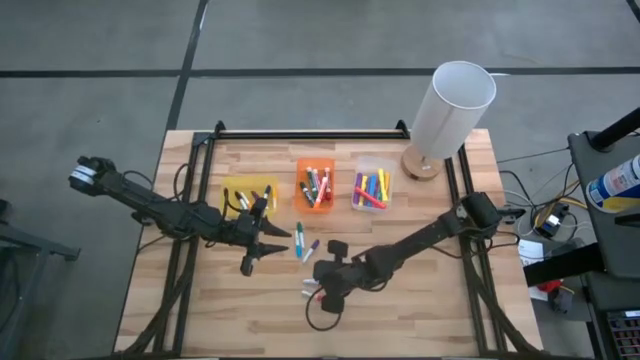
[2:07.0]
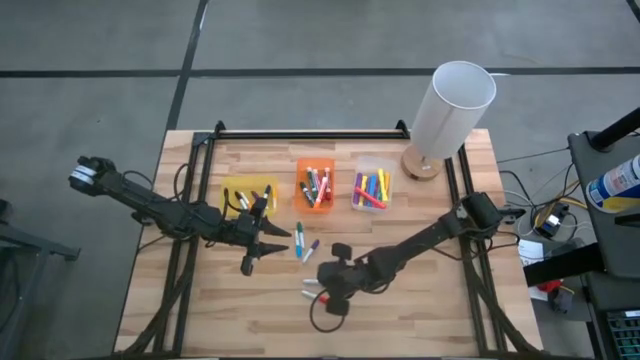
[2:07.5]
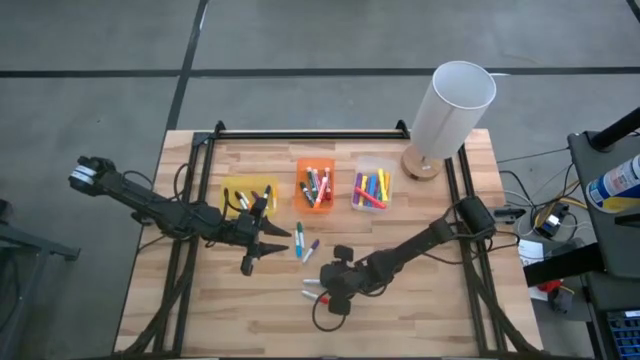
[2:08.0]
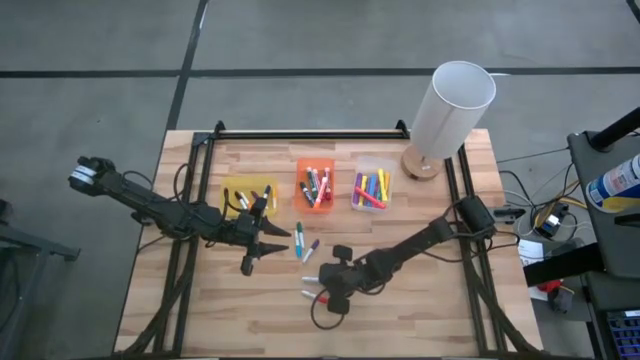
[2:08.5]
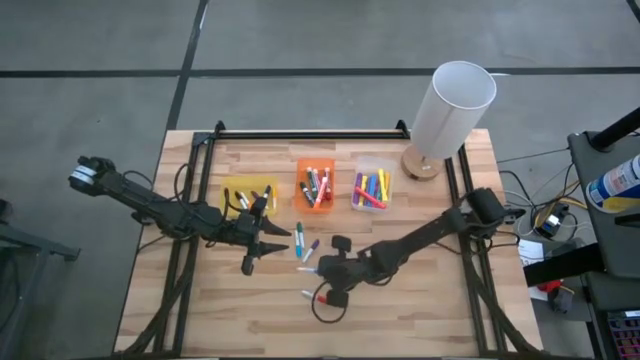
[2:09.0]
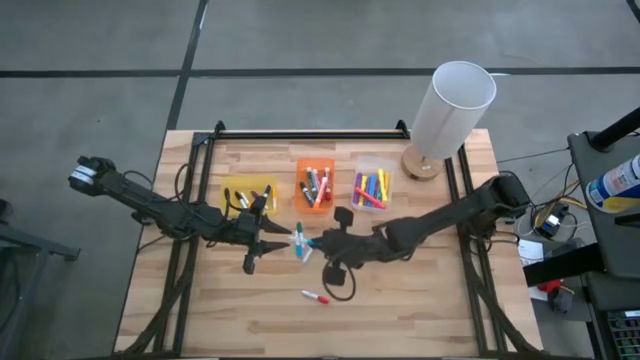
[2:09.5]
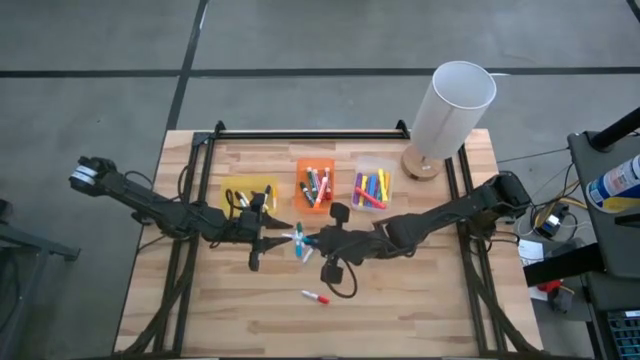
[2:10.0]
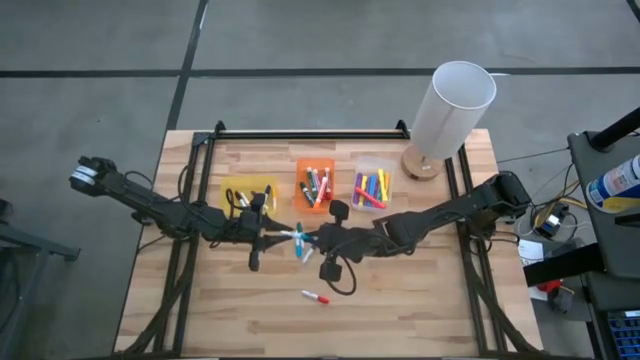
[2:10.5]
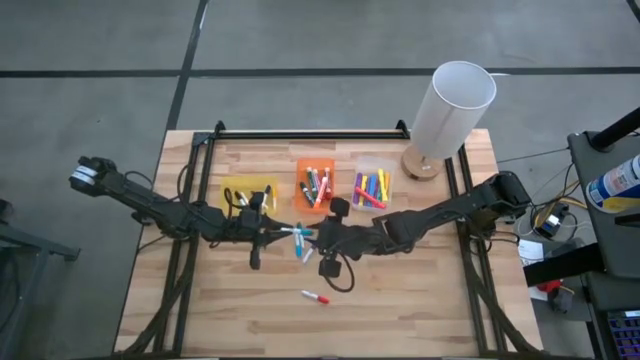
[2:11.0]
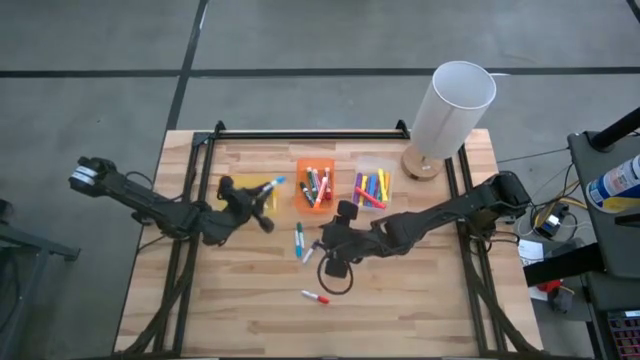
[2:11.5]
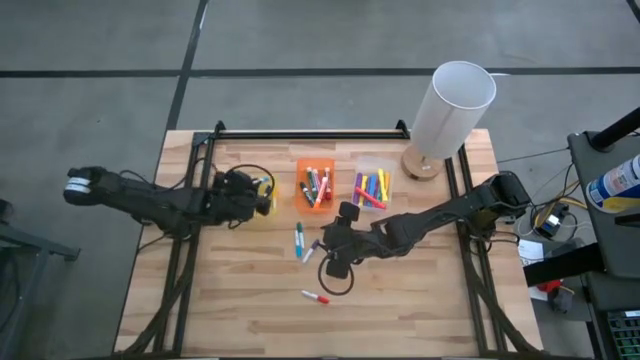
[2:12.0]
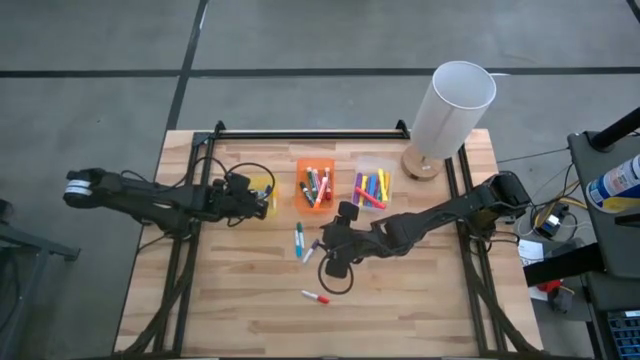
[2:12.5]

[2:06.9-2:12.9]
Task: Pick & Place Markers
Put the small light blue marker into the yellow bin

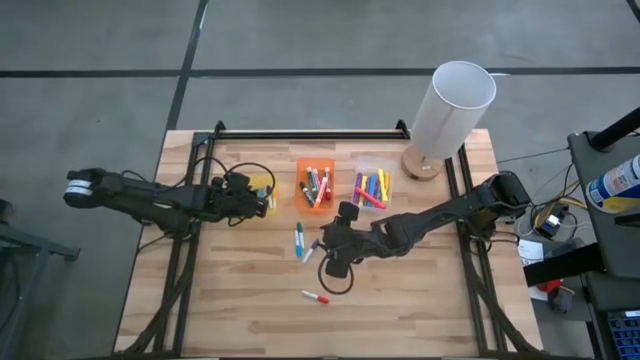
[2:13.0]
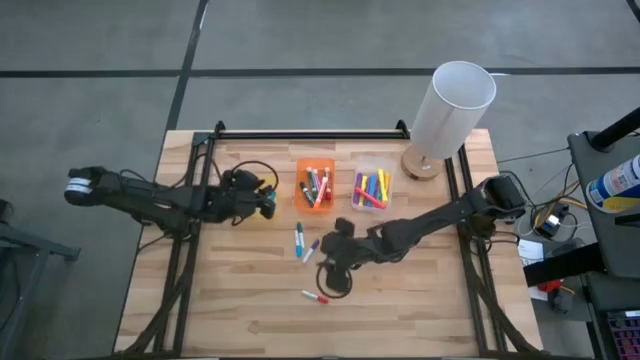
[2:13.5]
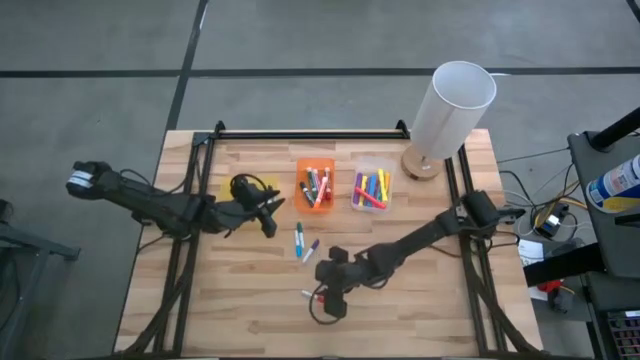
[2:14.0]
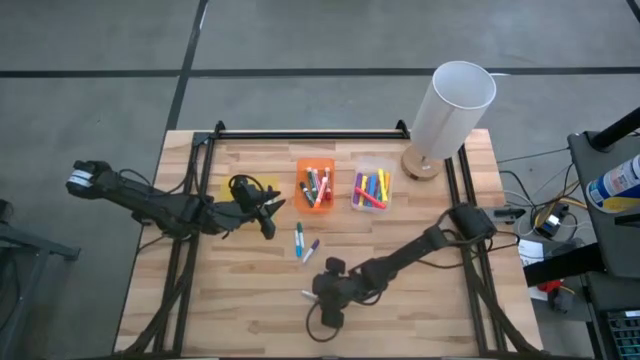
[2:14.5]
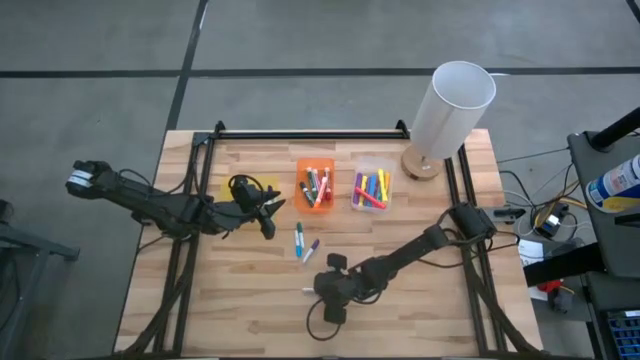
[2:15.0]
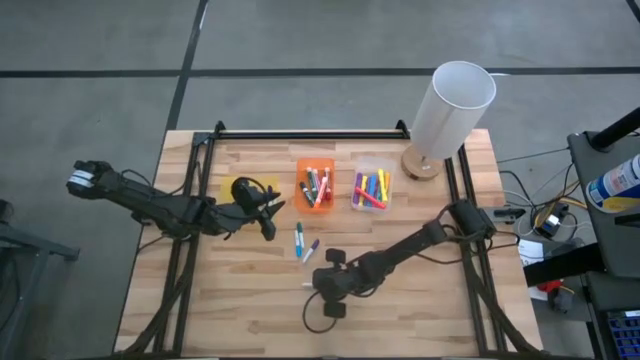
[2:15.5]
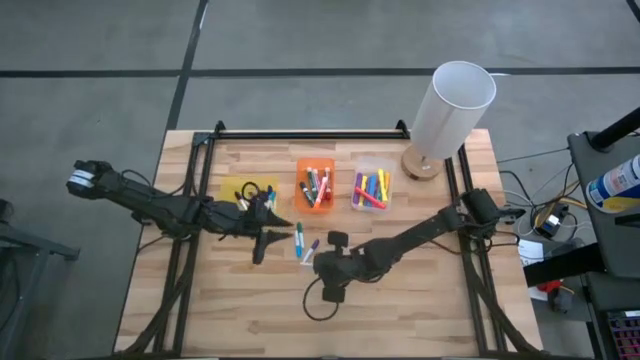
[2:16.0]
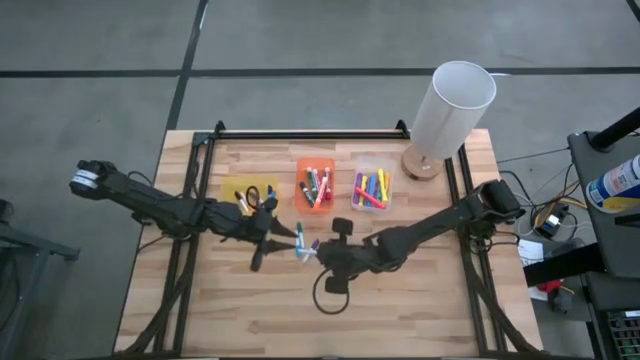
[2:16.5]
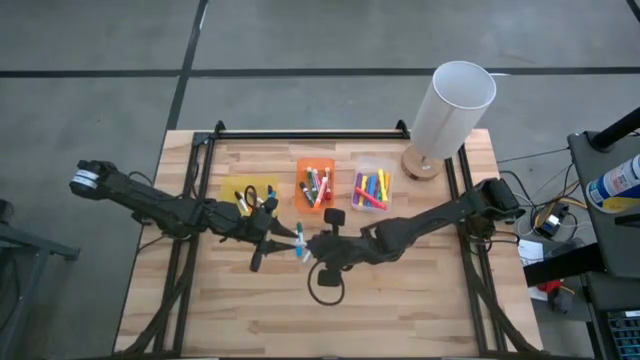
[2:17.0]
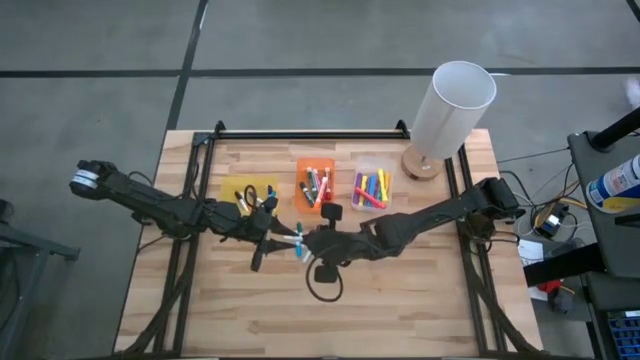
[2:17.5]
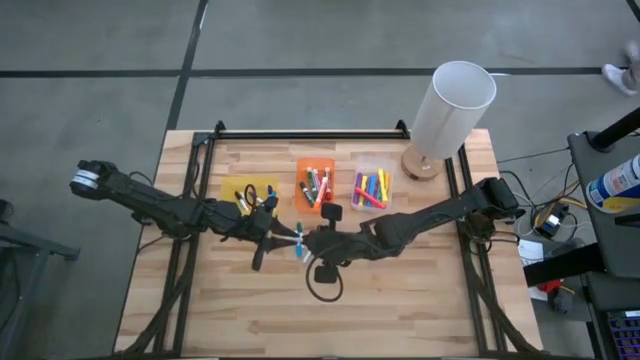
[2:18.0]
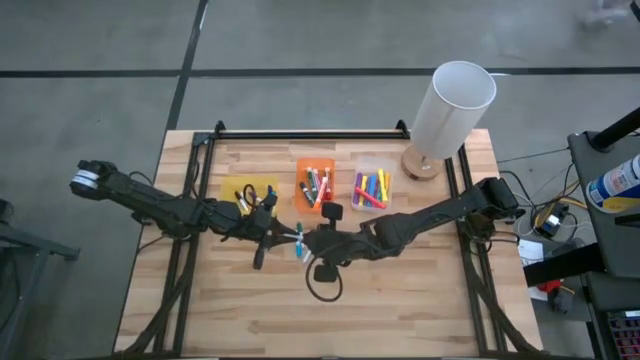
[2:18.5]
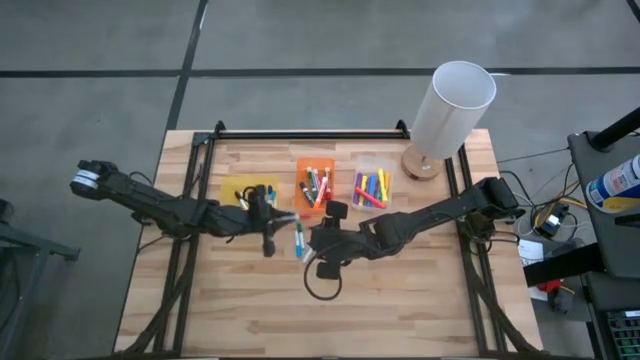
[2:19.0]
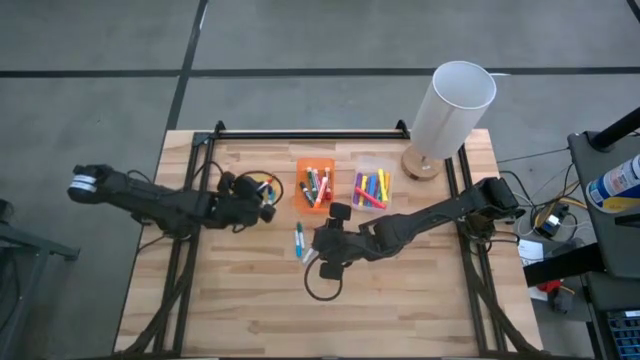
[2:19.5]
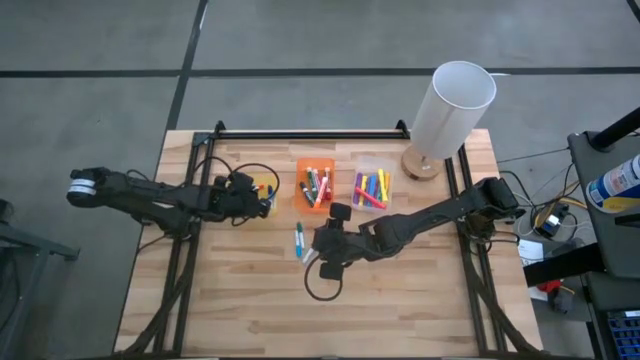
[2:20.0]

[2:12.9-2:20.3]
Put the small red marker into the yellow bin

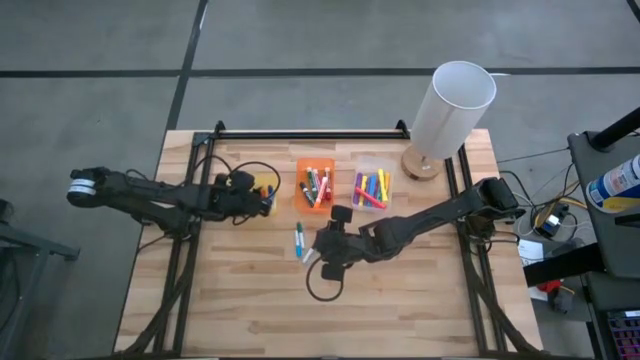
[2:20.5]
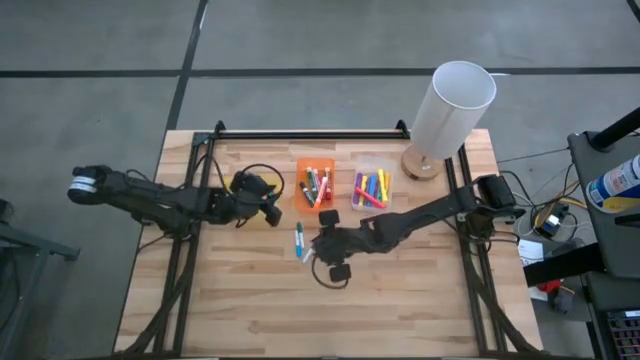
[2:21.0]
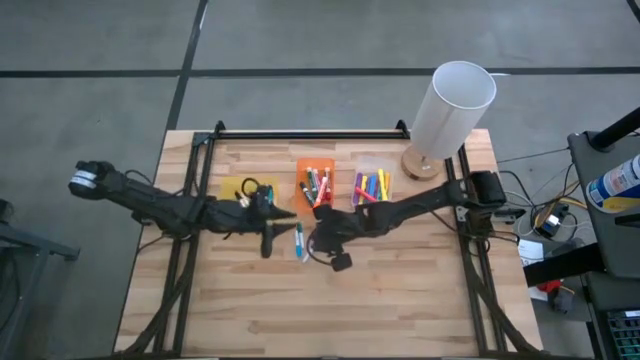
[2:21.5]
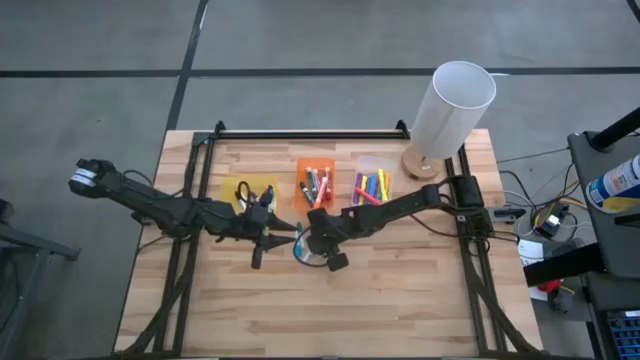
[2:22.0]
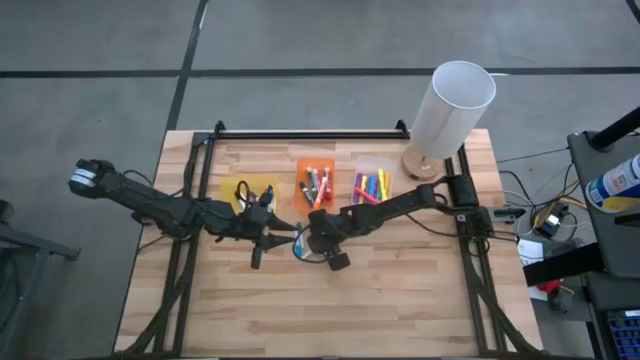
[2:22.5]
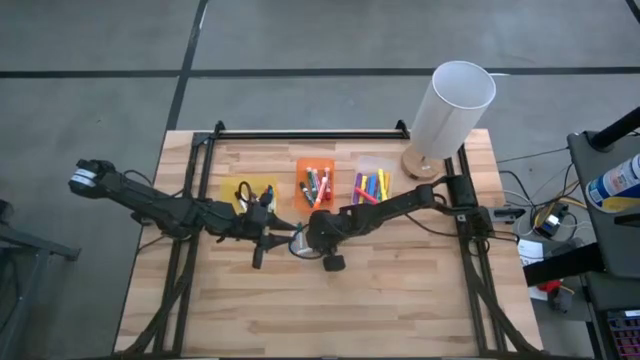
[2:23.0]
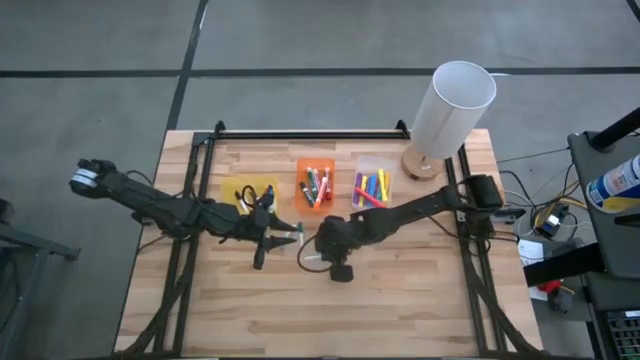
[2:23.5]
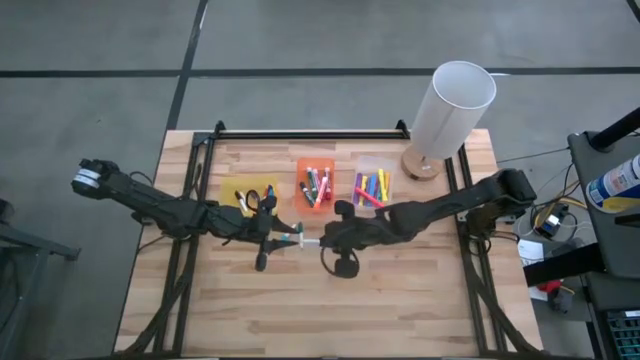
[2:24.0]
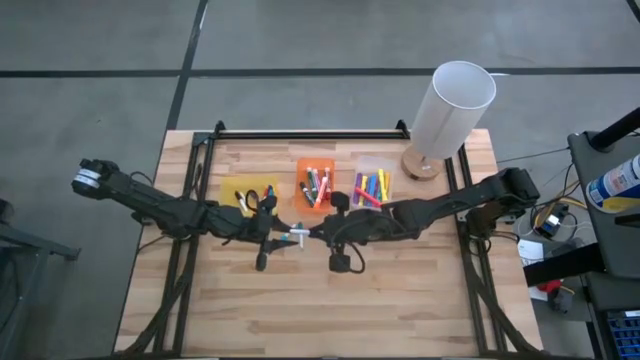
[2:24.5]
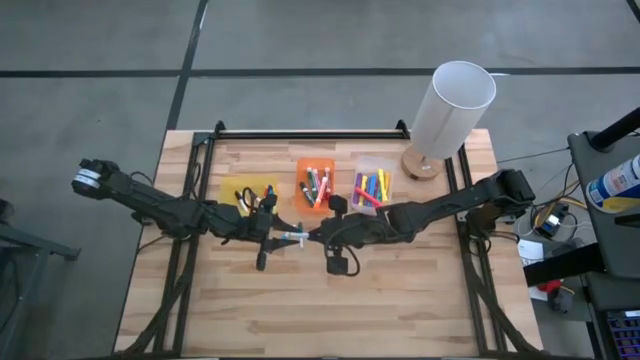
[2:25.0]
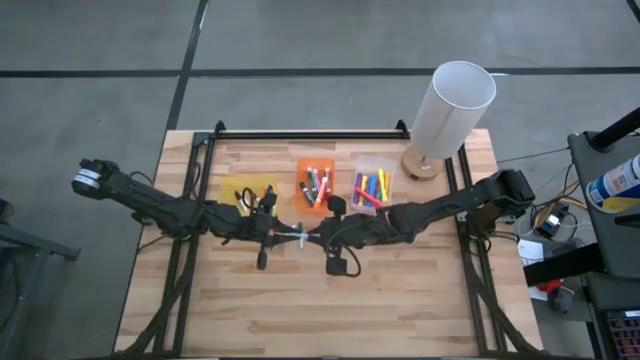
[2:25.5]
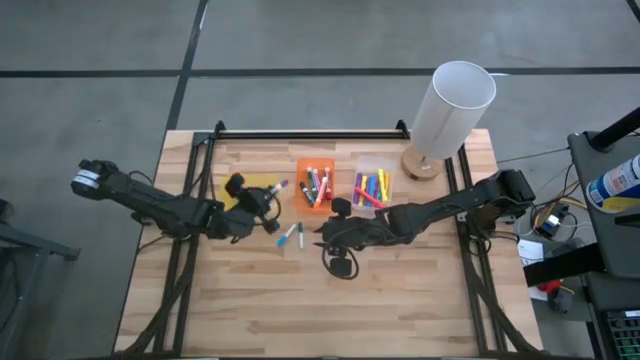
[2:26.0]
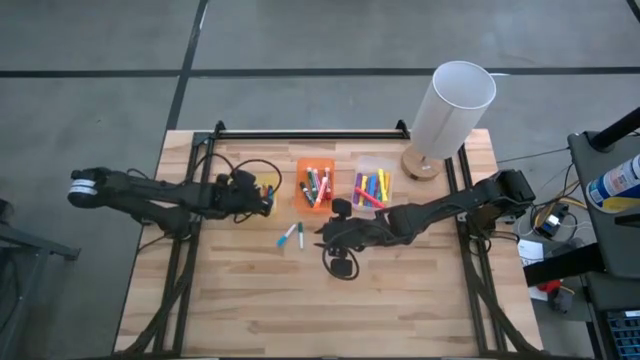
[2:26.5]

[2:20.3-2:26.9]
Put the small dark purple marker into the yellow bin

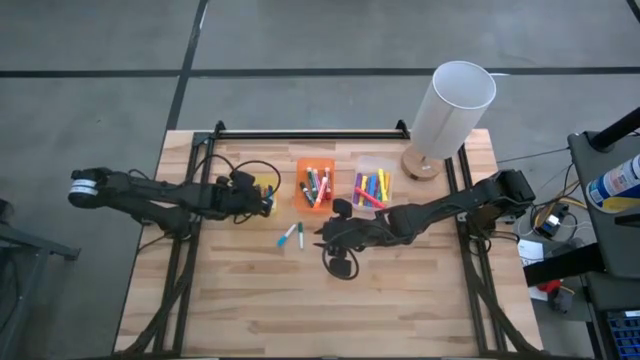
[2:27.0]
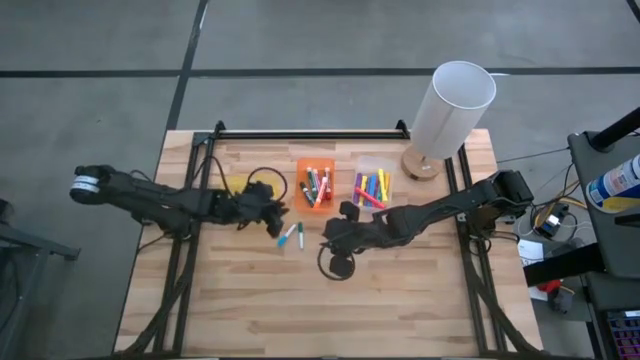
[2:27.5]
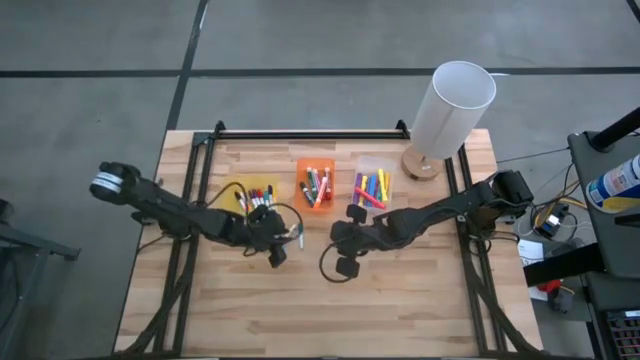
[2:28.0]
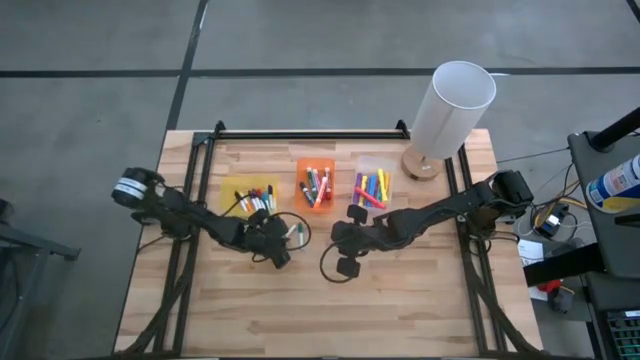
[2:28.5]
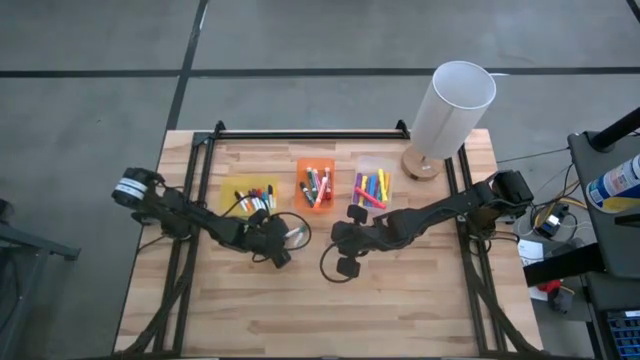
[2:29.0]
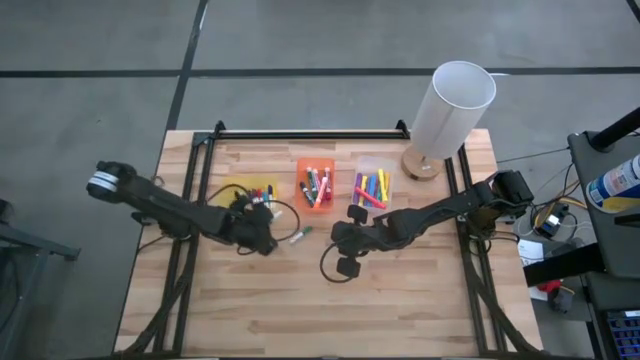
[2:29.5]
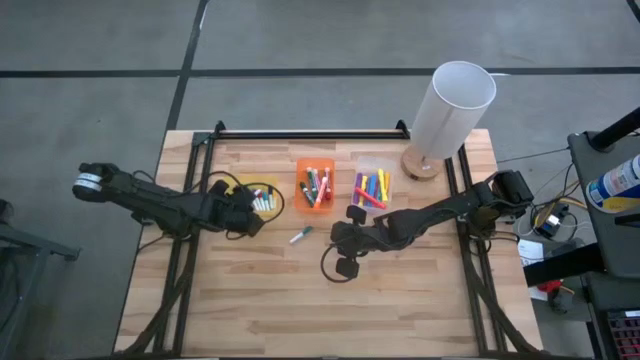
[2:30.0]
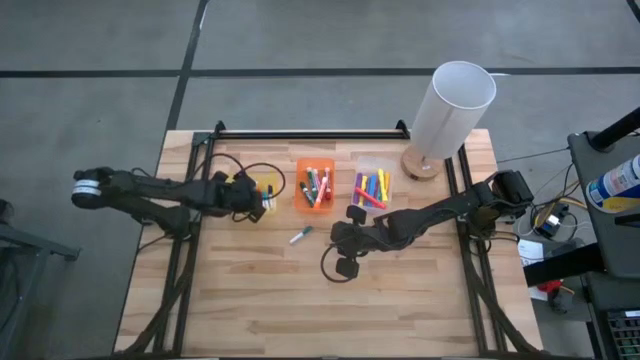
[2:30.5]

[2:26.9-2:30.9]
Put the small light blue marker into the yellow bin
